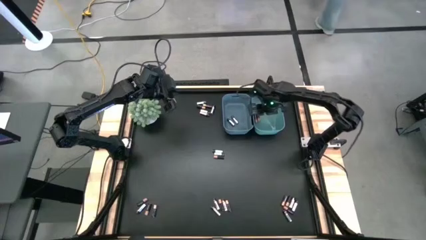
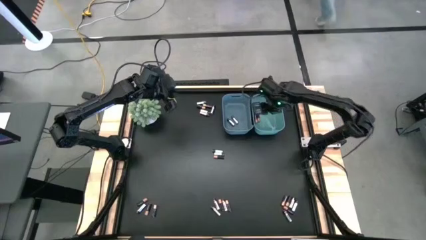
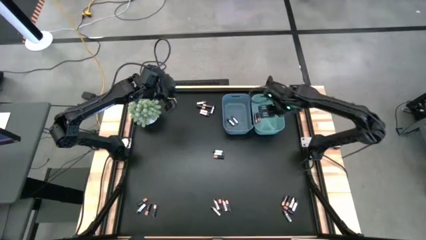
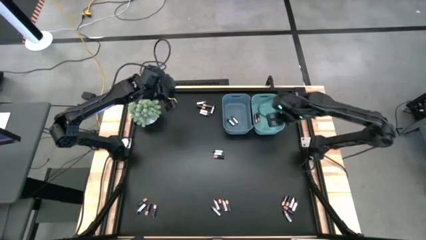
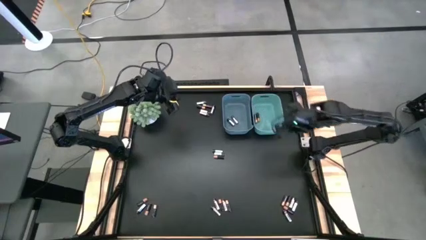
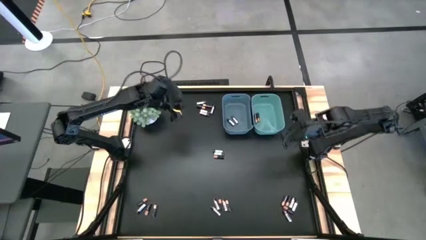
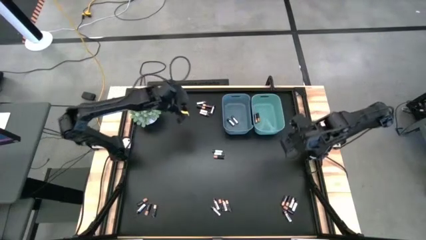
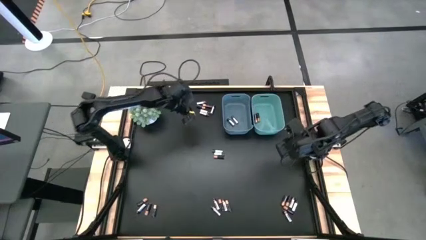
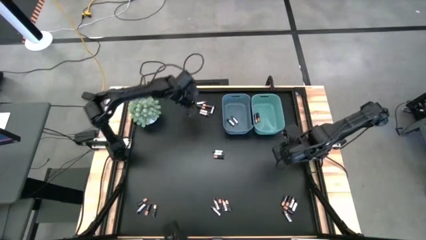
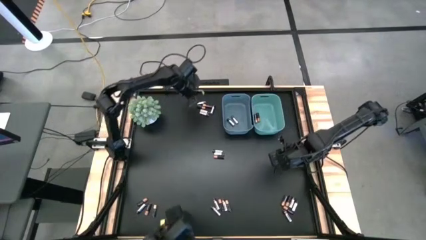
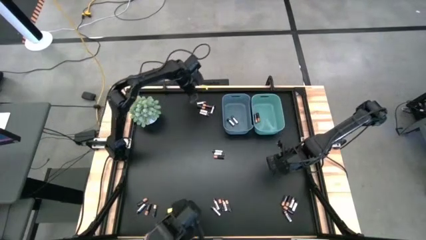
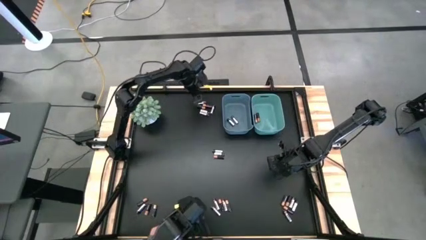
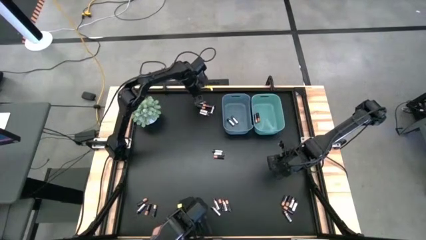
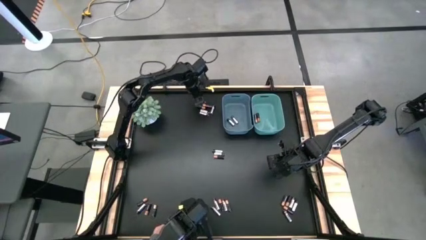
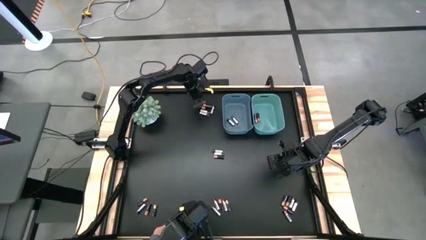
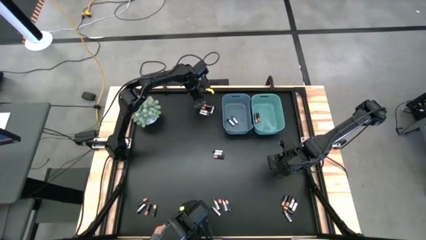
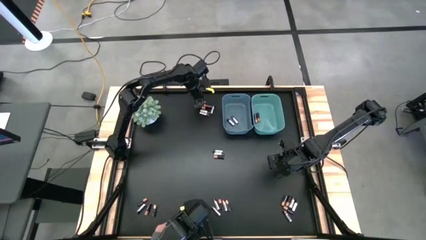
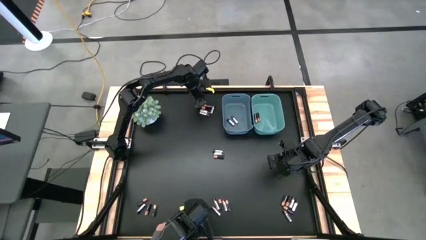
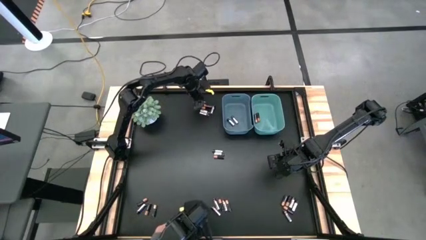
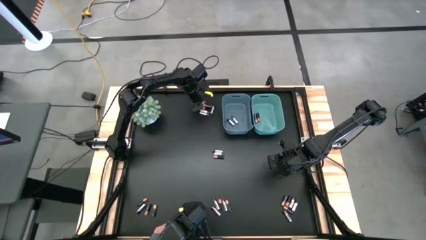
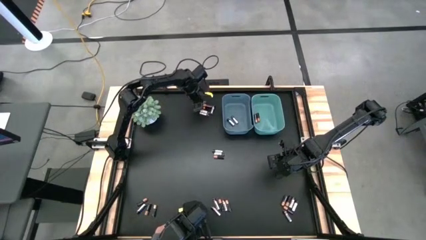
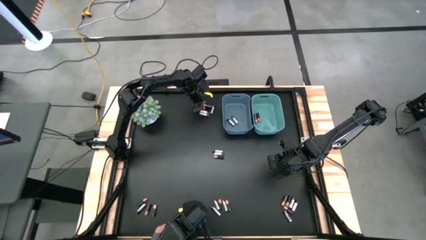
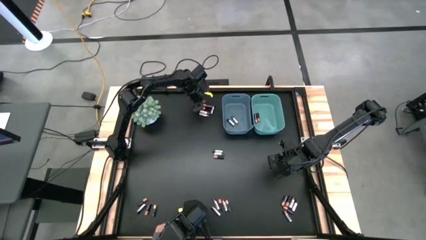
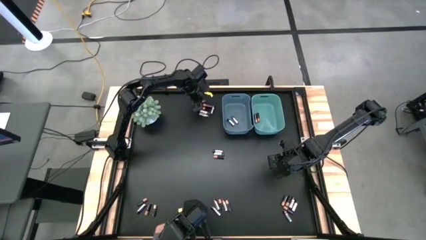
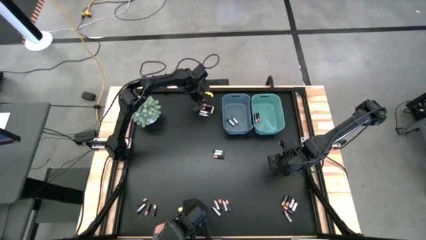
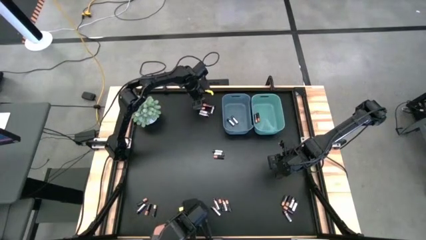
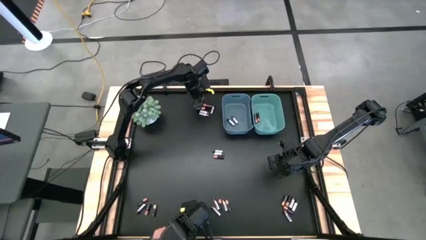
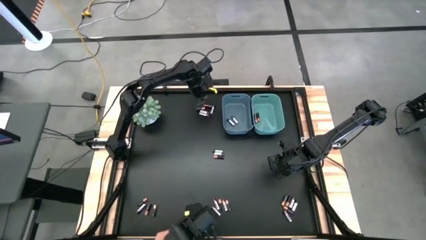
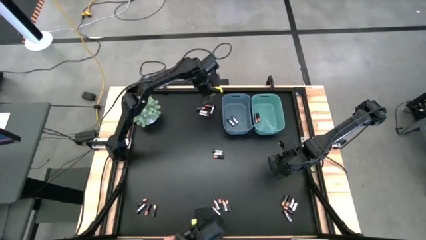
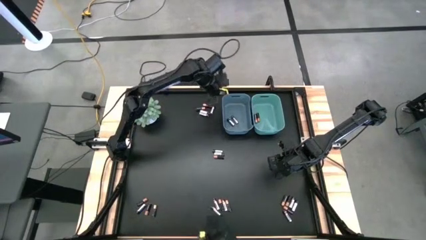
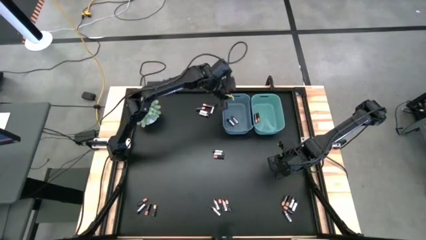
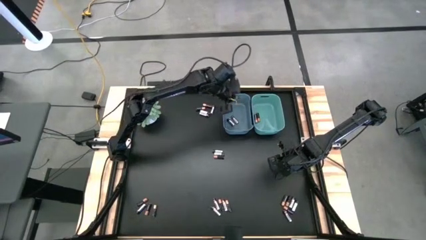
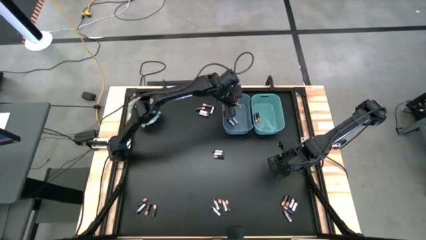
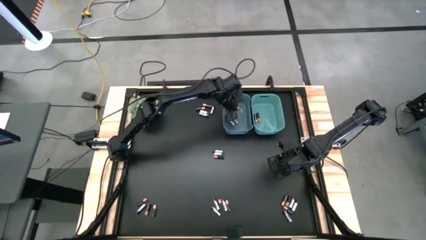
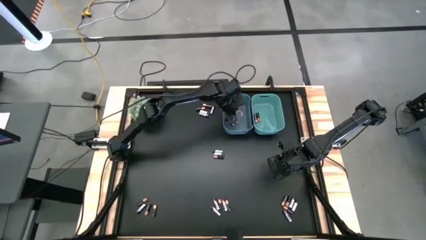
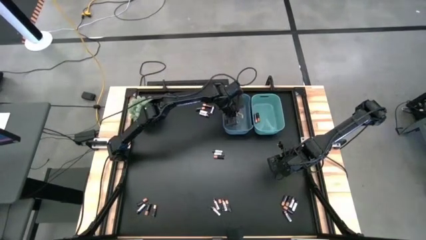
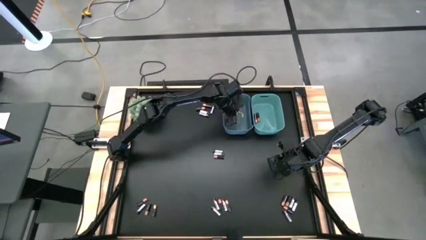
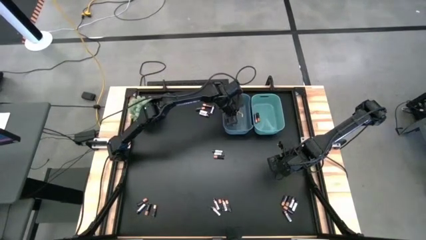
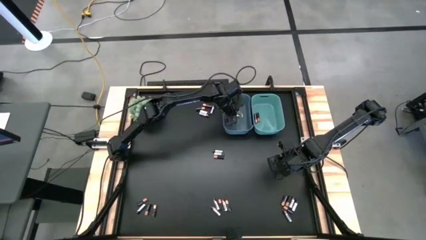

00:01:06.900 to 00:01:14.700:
Task: Sort batteries
Put the silver battery into the blue bin

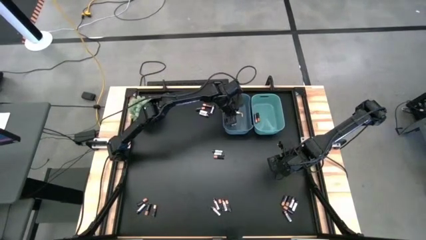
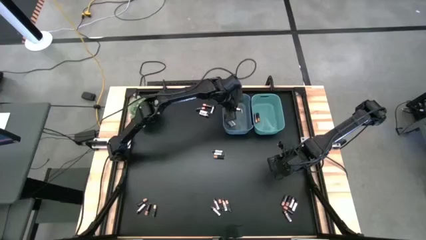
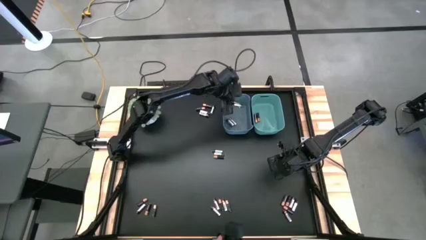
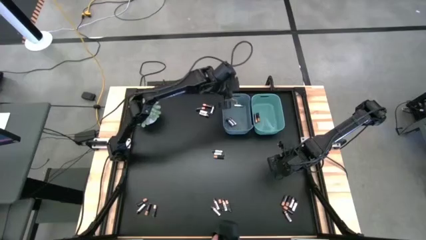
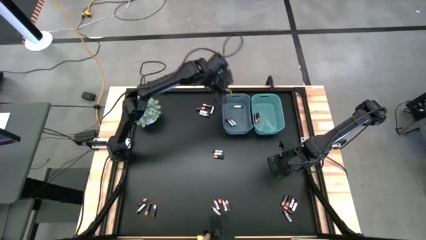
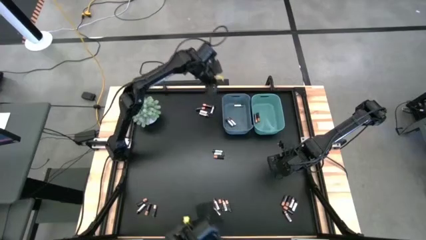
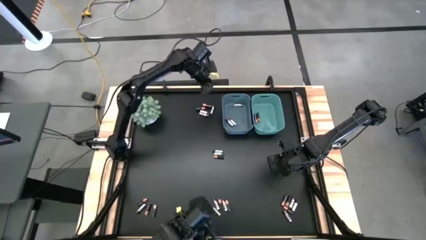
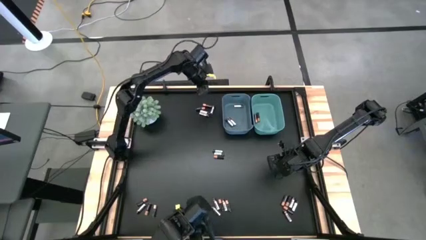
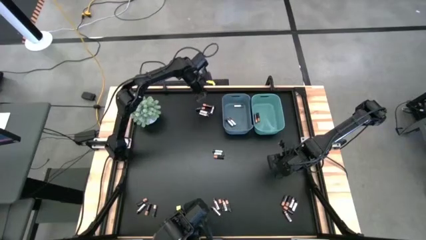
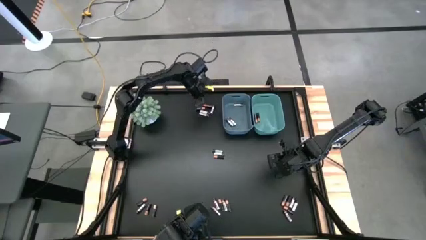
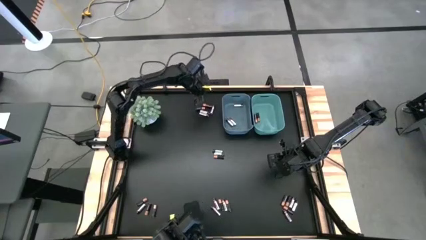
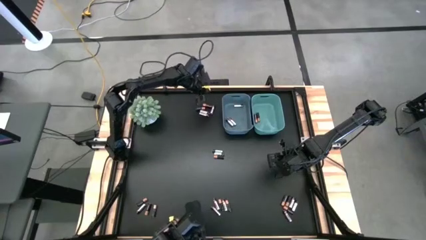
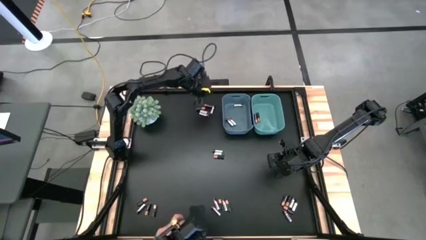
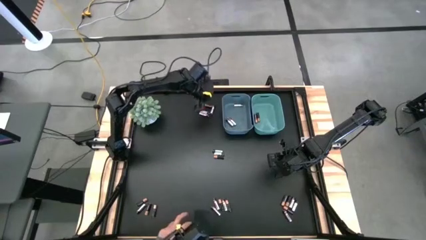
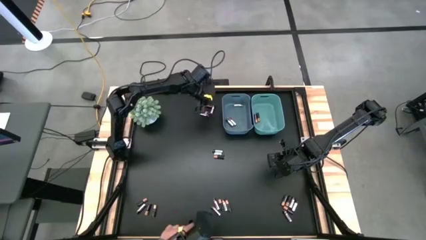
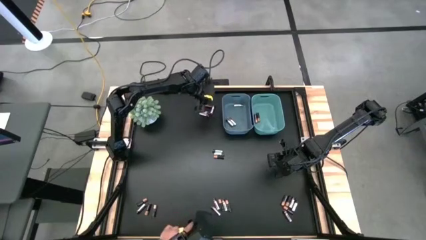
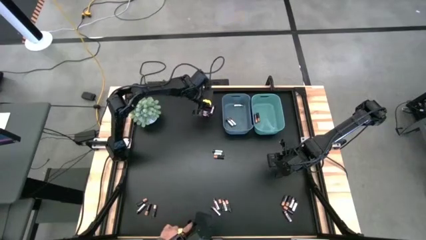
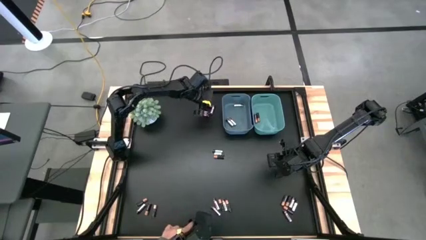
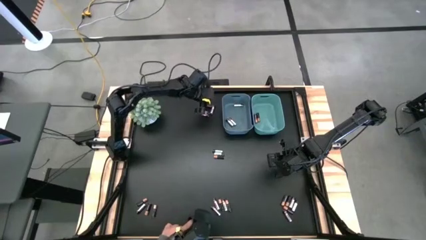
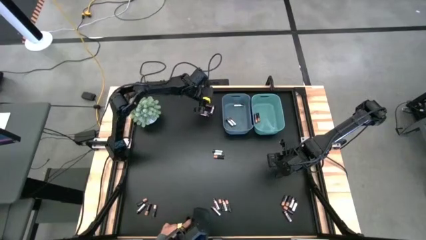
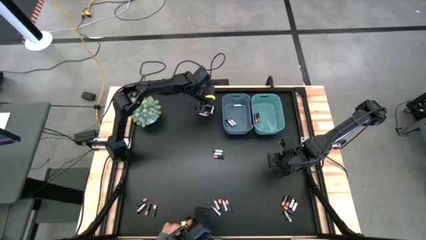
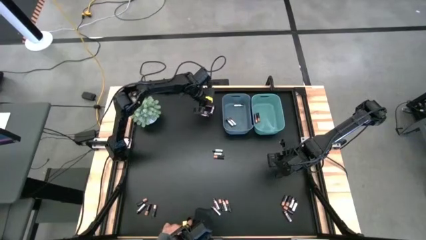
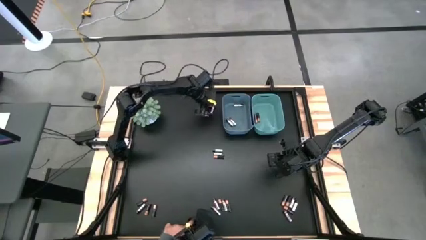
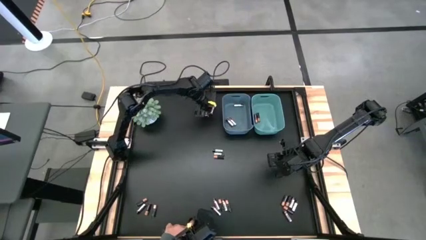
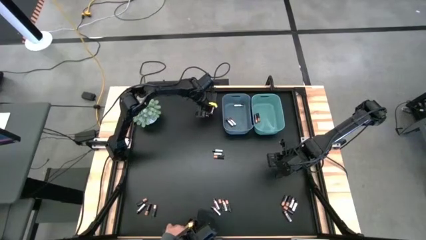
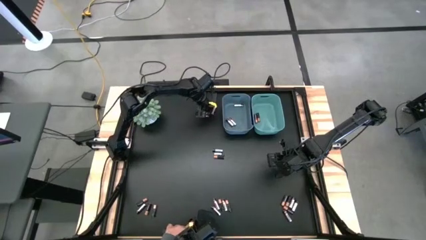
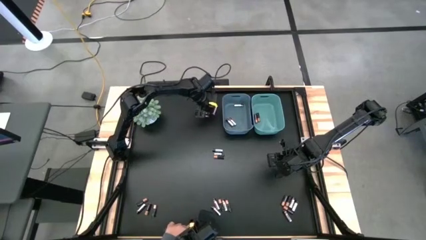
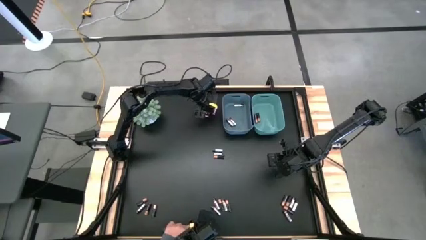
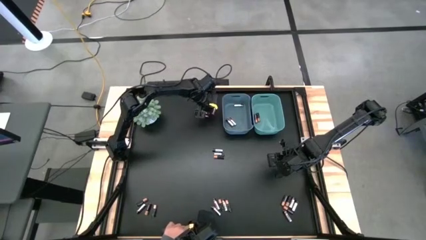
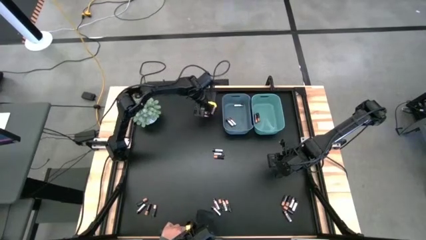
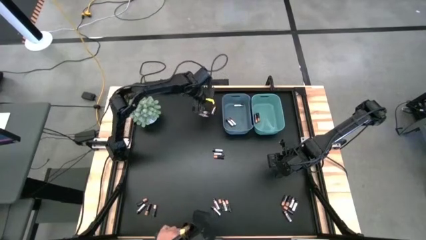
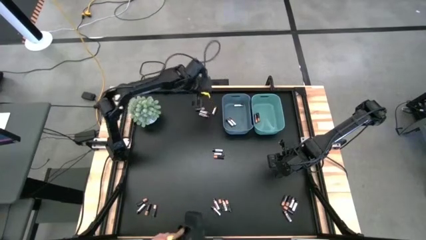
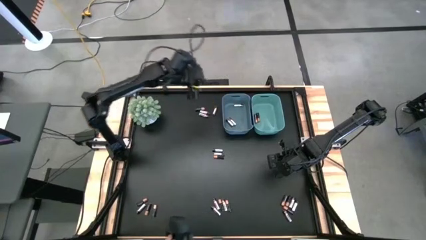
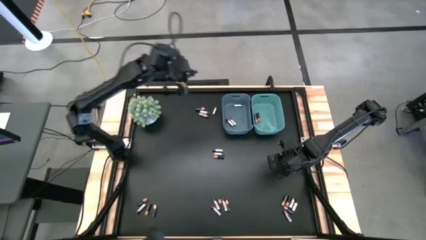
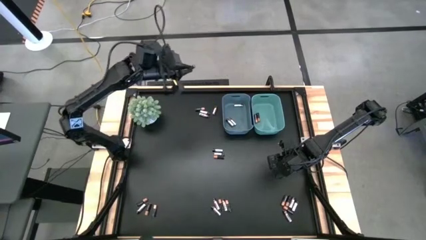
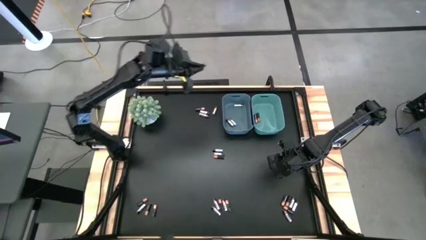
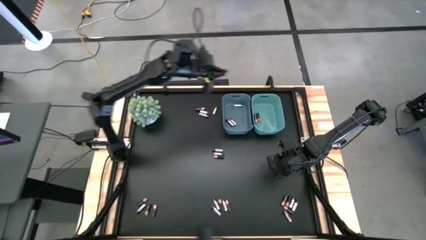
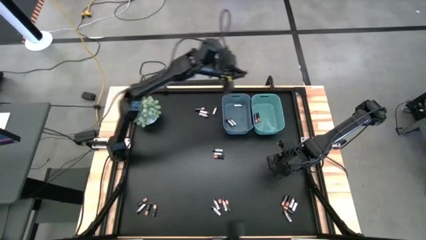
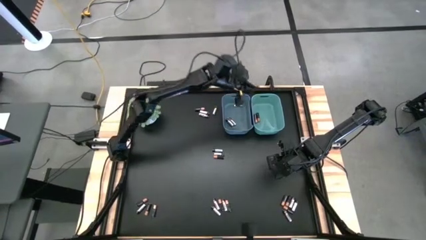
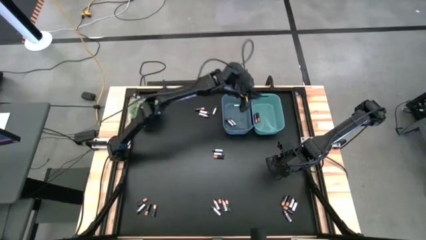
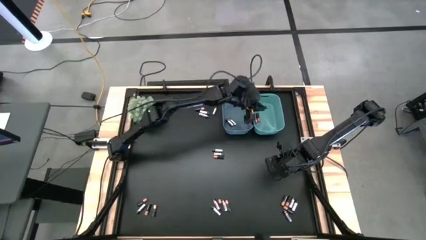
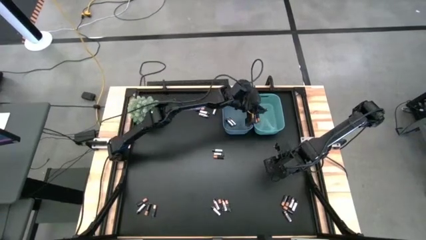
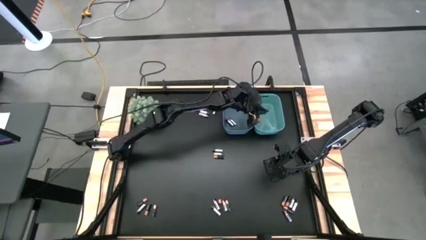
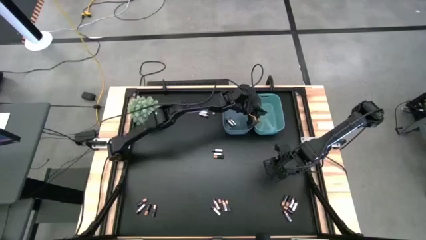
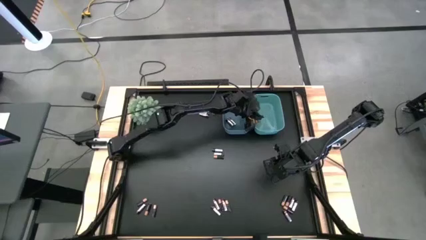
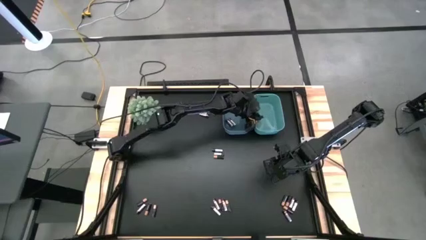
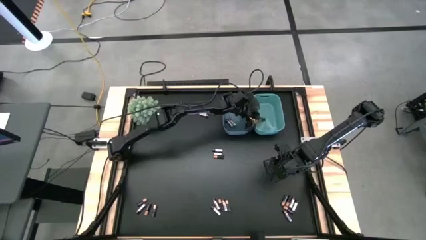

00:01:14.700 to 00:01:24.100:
Put the black battery into the green bin

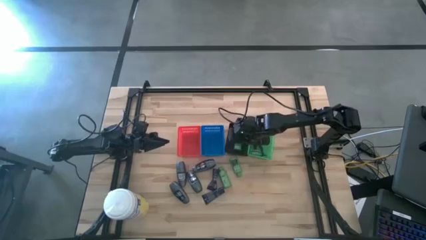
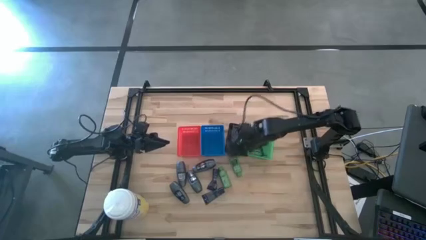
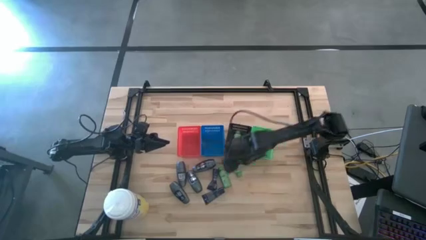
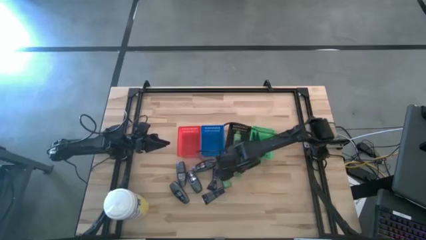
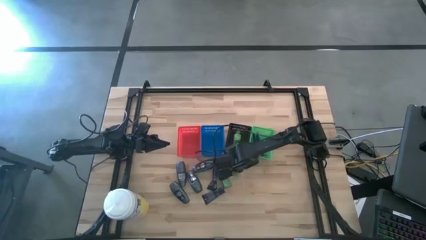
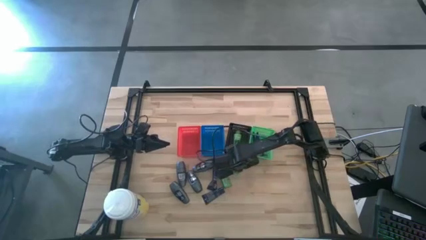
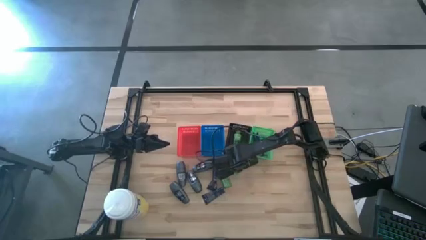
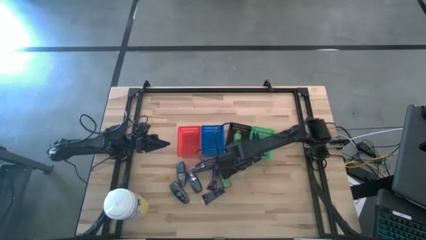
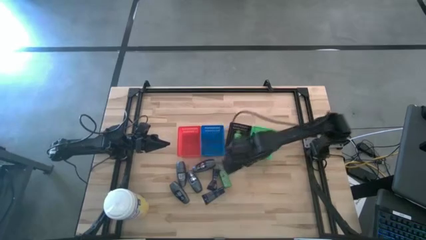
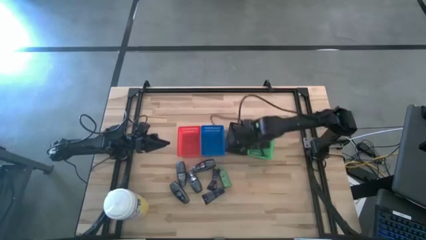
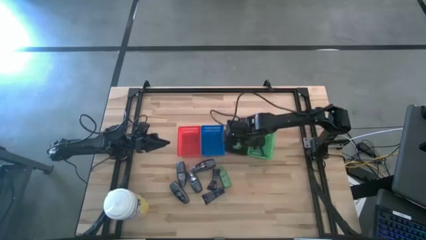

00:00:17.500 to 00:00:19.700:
Task: Pick & Place Travel size toiletries
Put the shampoo into the black bin
